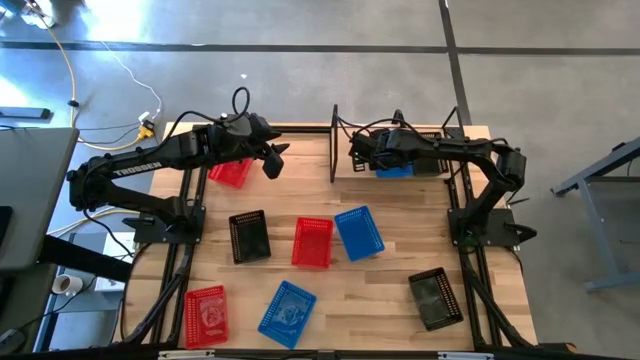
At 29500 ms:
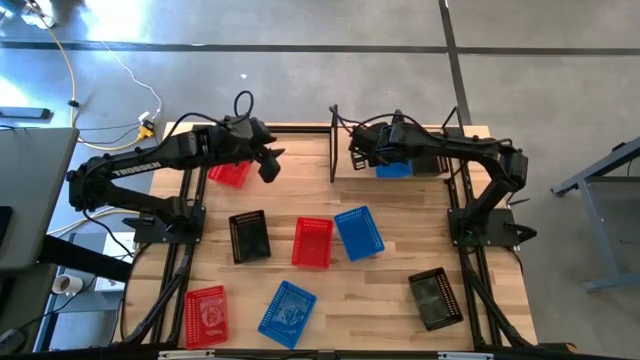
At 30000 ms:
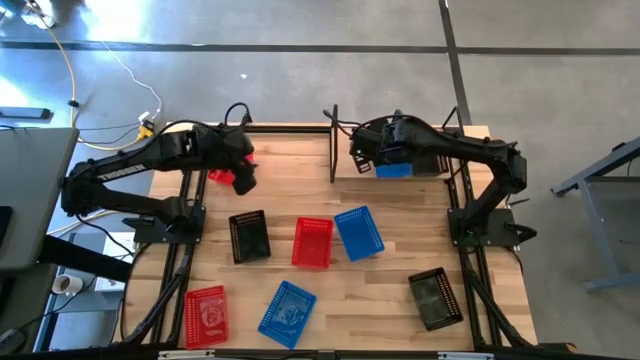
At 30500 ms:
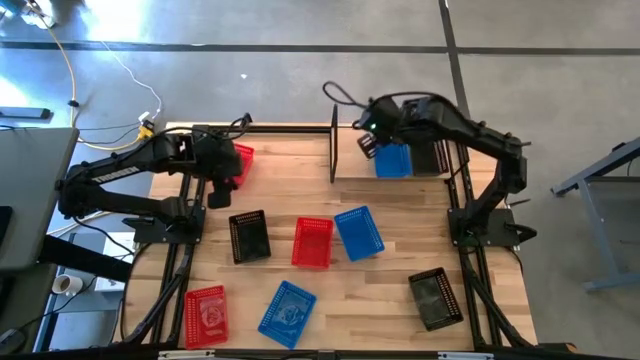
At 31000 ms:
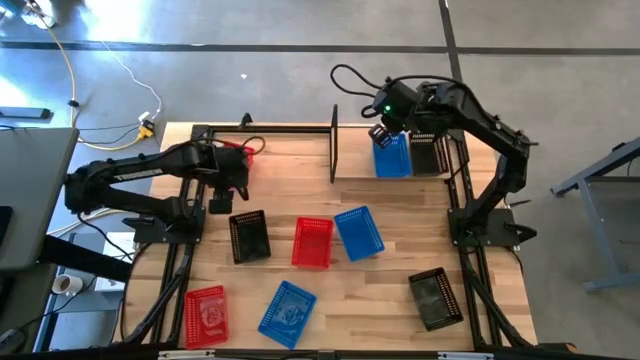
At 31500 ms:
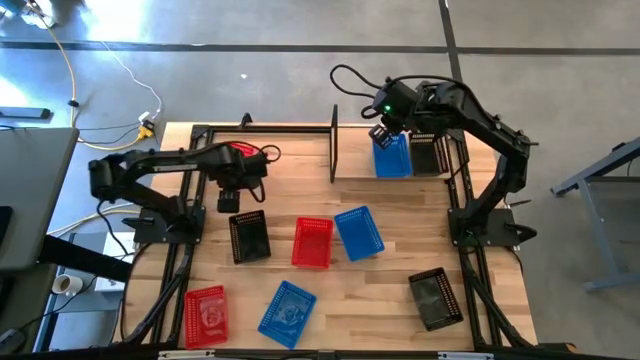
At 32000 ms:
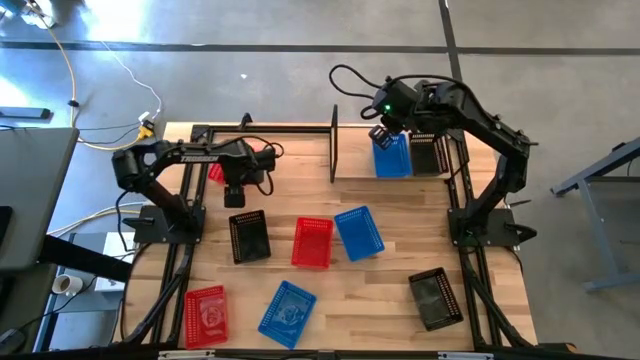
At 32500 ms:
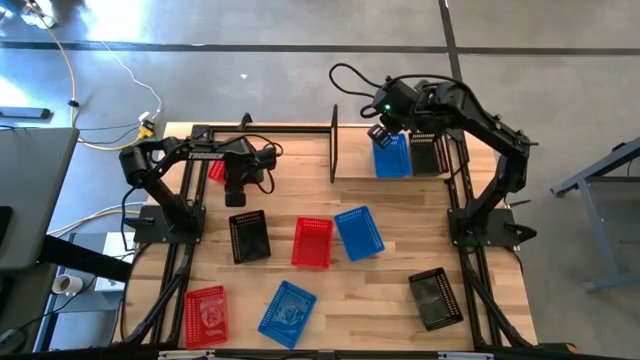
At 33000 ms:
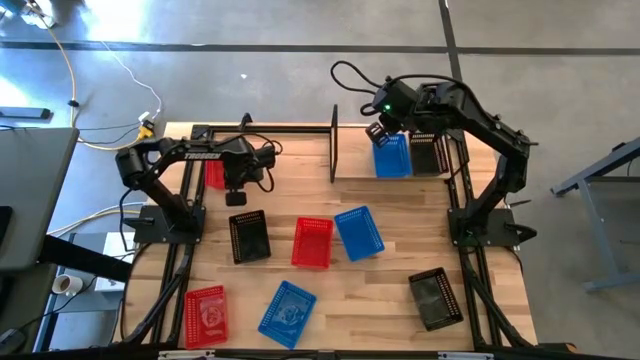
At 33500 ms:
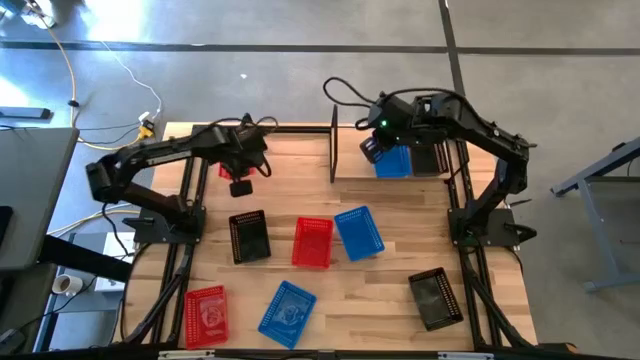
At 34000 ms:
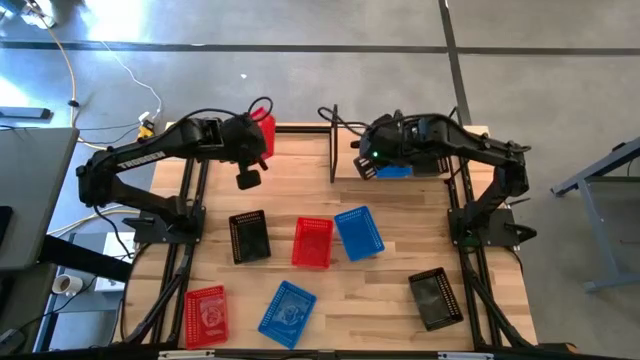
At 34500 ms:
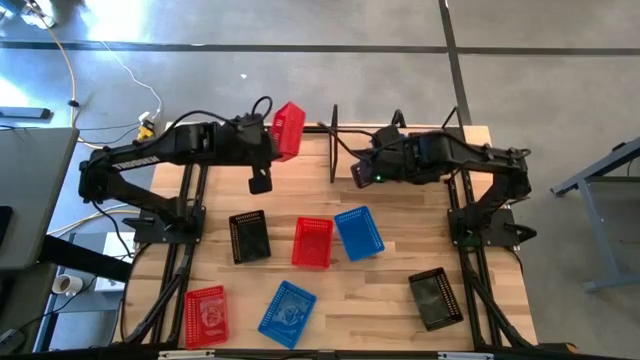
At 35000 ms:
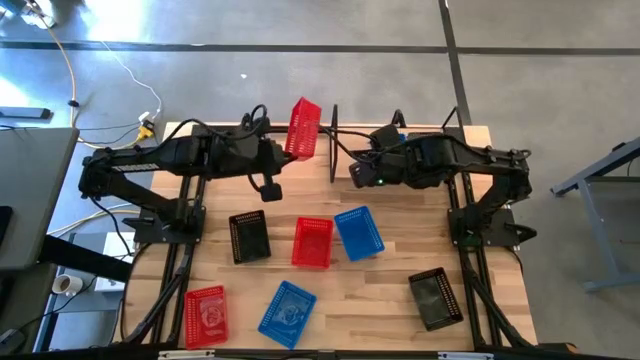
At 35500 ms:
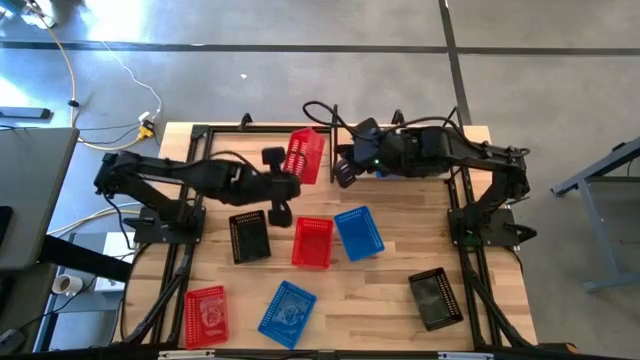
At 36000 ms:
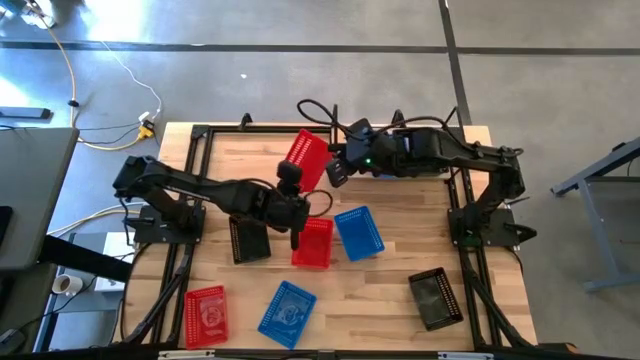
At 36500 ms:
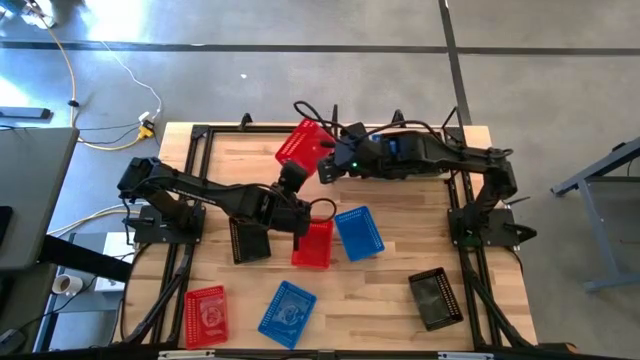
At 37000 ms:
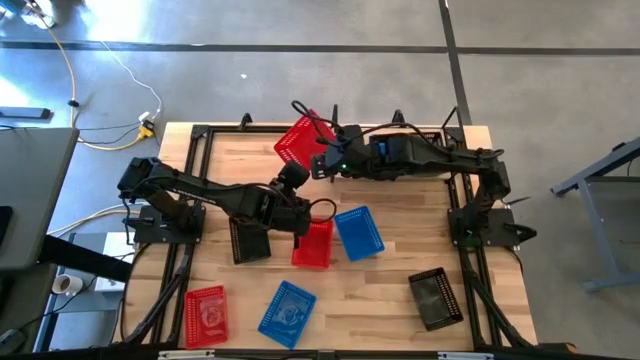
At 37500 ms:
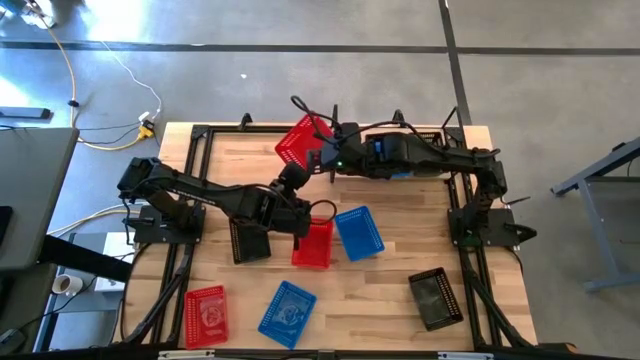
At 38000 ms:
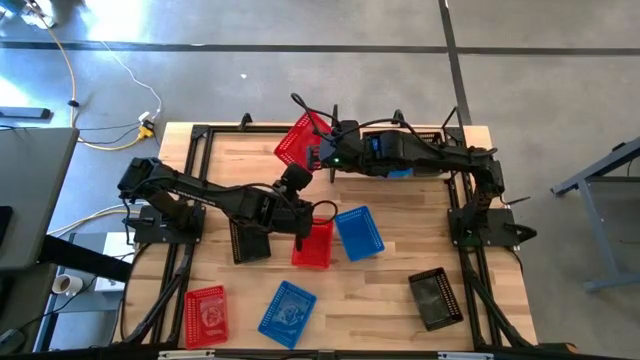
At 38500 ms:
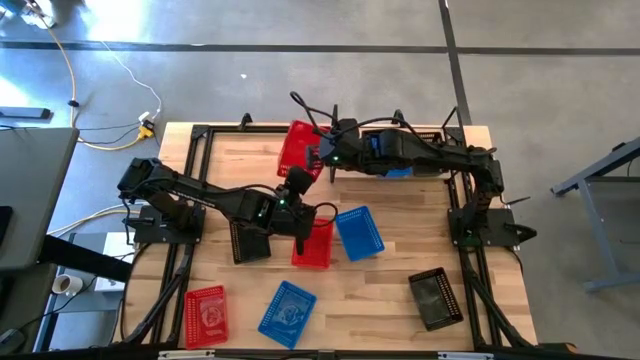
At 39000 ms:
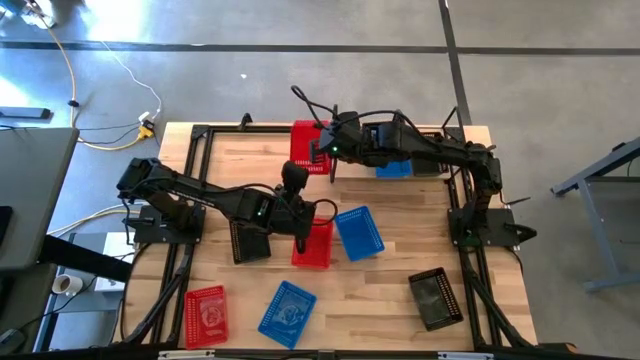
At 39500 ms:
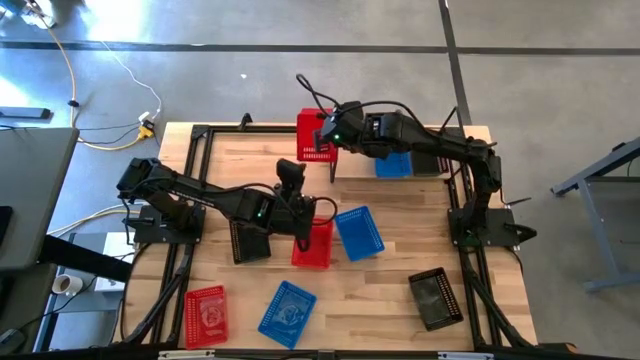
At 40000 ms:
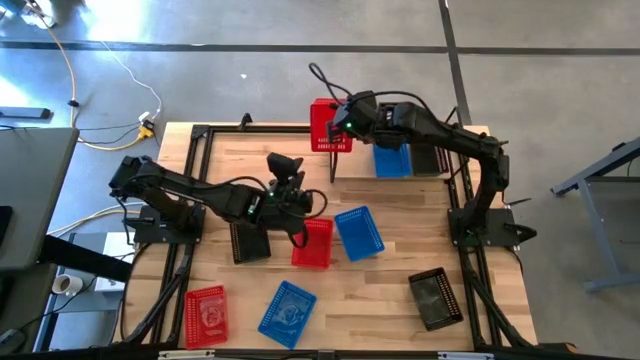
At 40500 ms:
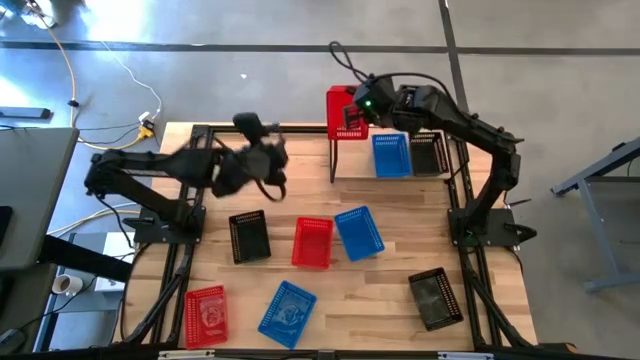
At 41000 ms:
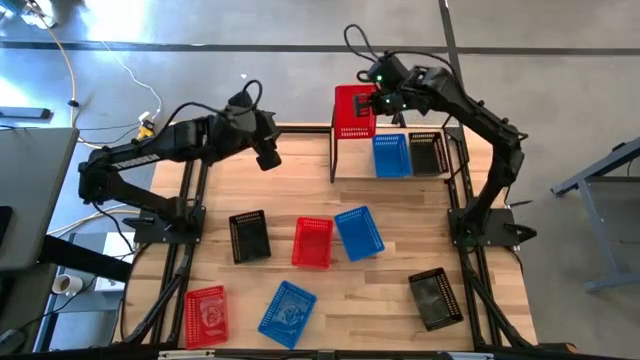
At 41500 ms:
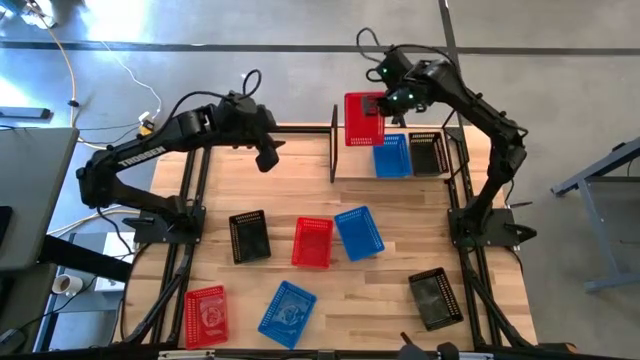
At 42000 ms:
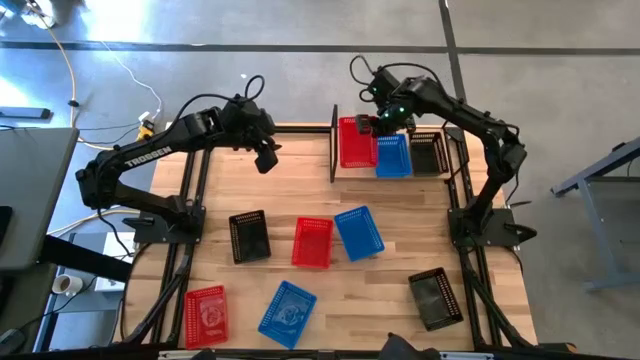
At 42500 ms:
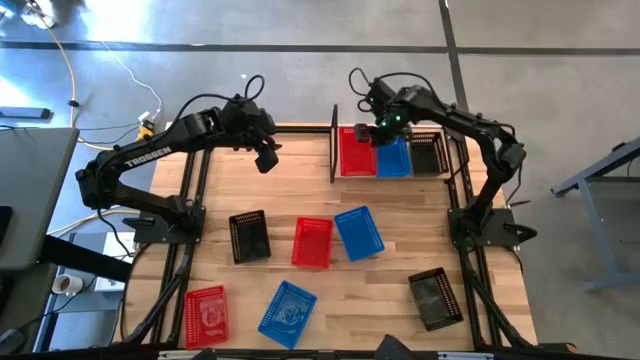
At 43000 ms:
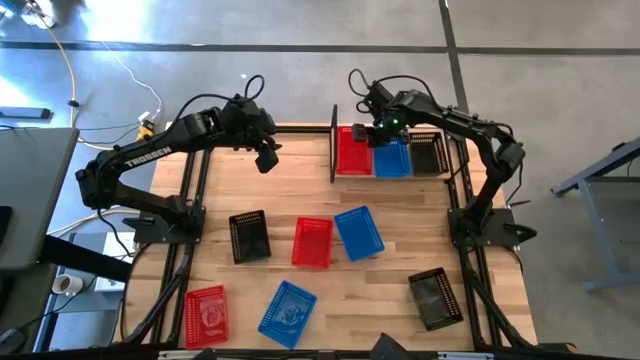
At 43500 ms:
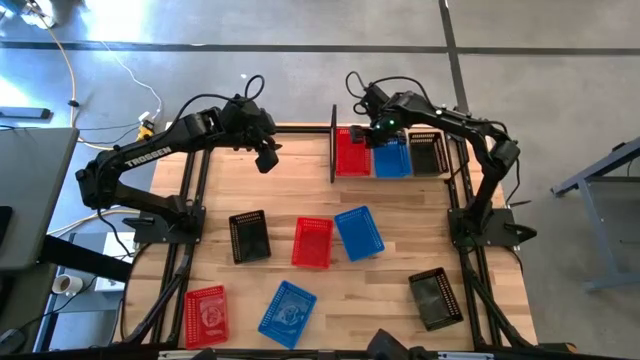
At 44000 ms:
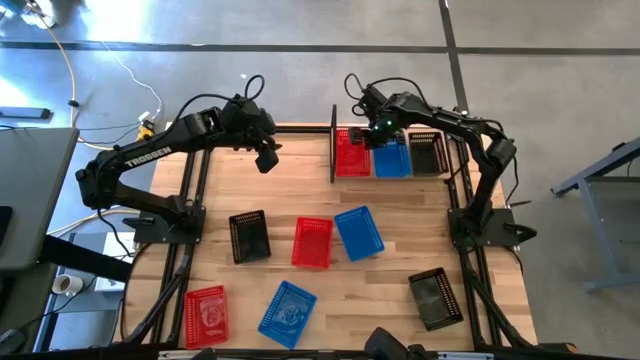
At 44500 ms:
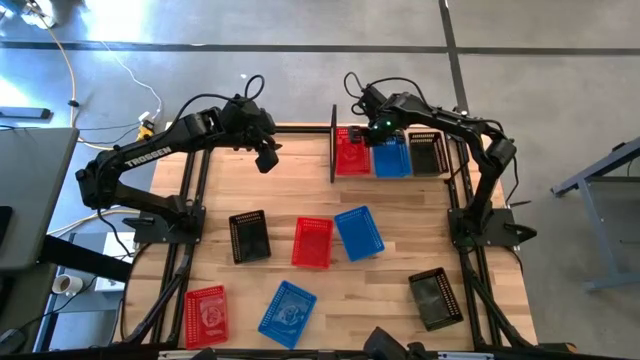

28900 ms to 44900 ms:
Task: Stack baskets on shelf by color
Put the top red basket on the shelf

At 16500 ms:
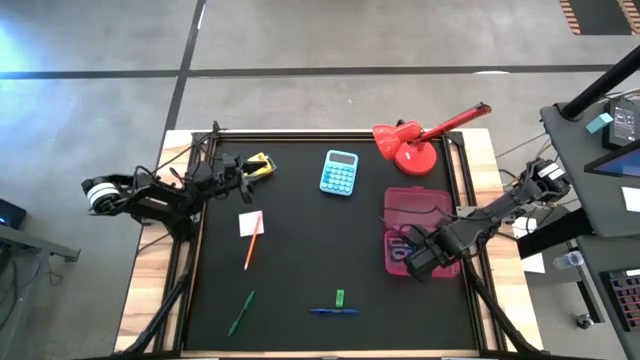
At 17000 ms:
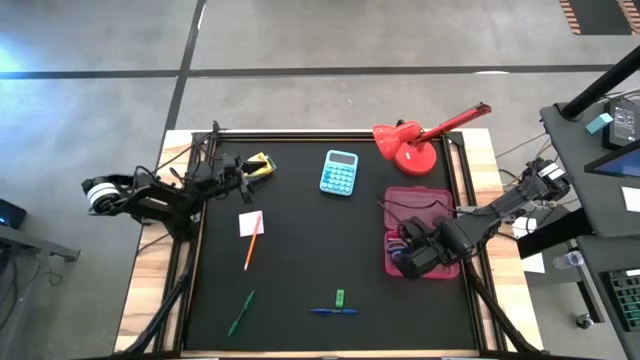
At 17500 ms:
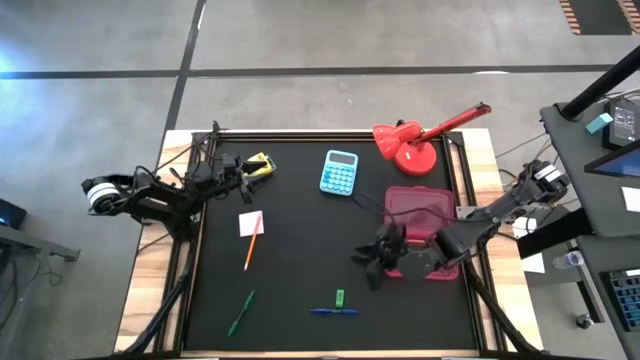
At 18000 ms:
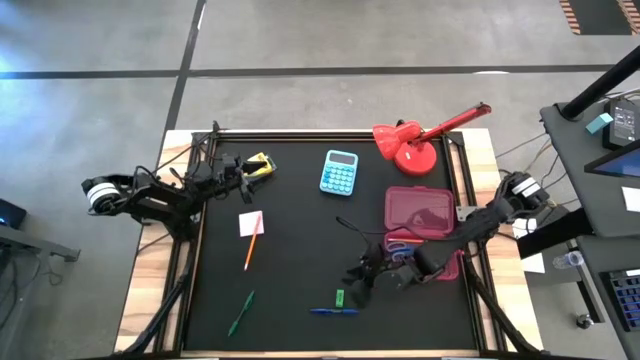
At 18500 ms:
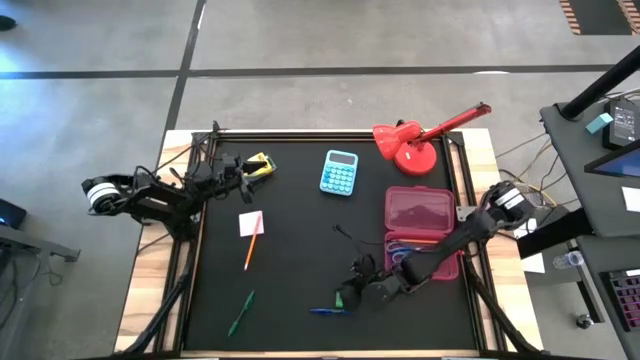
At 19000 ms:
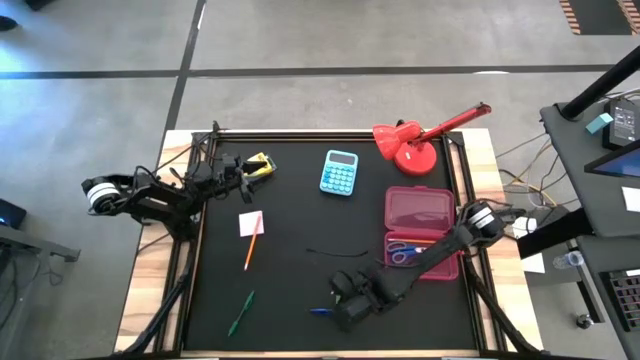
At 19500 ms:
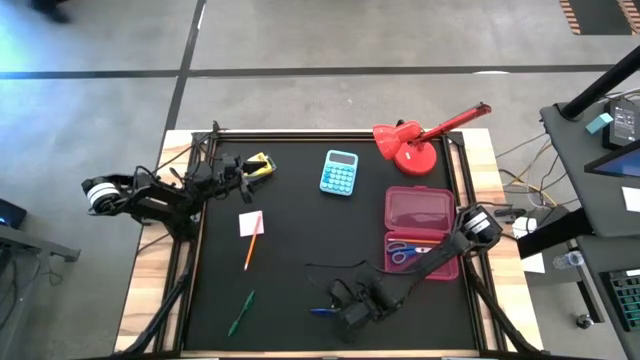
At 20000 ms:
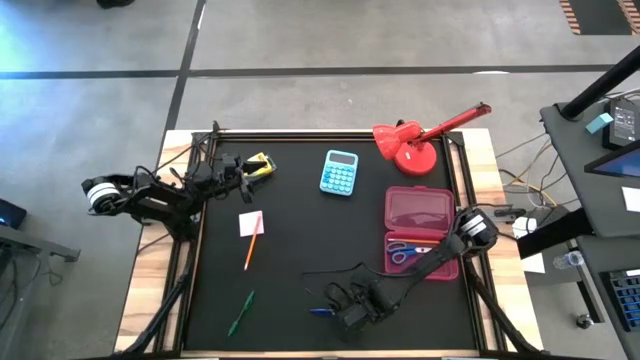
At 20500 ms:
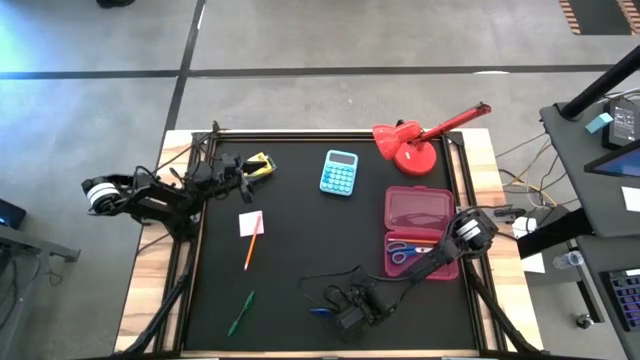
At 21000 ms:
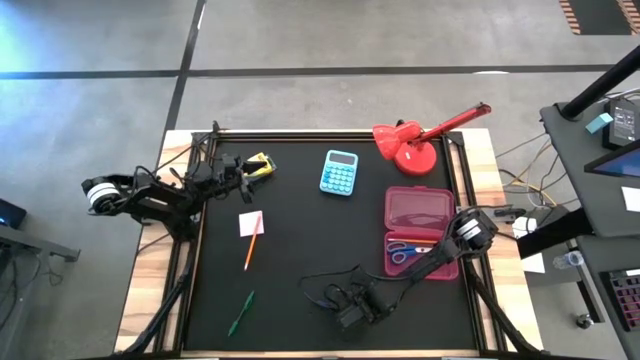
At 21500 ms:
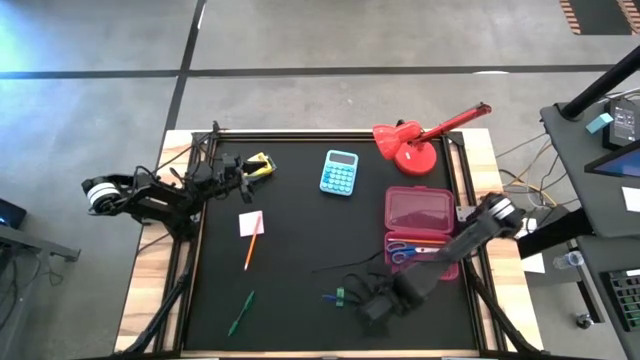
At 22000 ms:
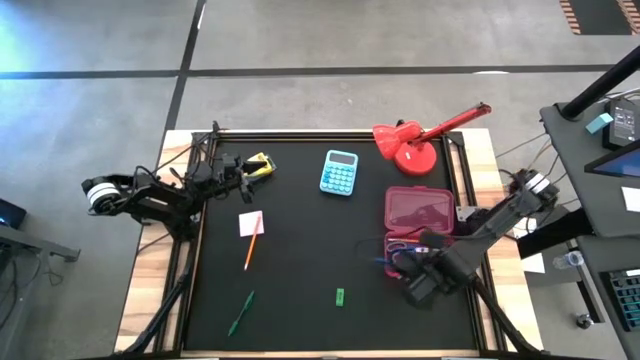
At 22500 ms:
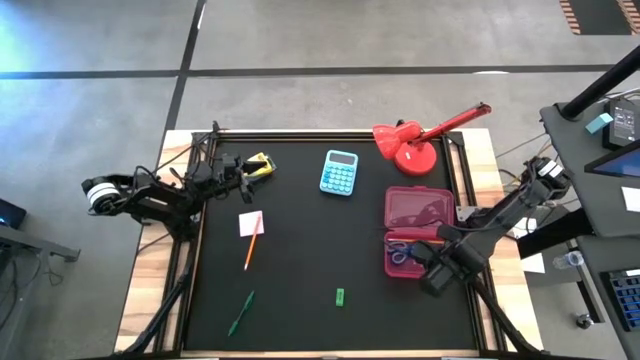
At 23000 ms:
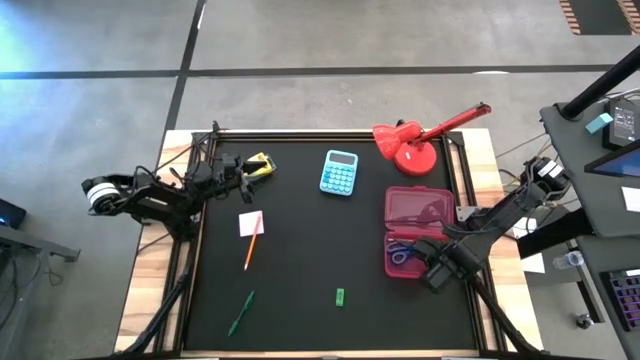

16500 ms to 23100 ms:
Task: Pack school essentials
Put the blue pen into the pink supply box
